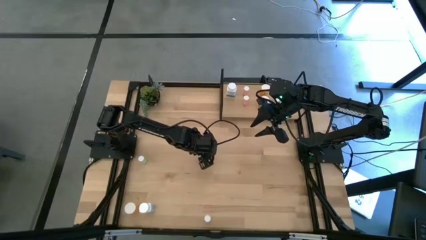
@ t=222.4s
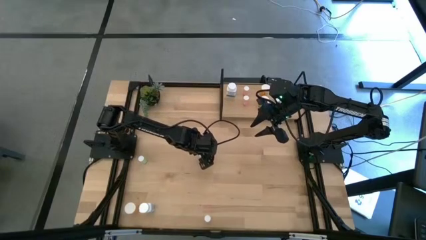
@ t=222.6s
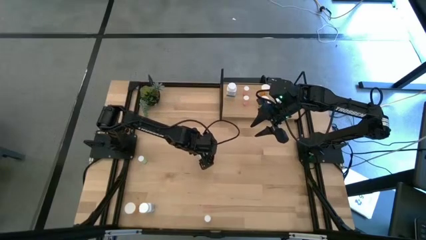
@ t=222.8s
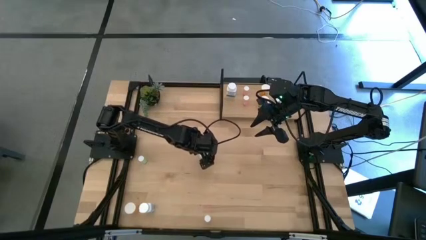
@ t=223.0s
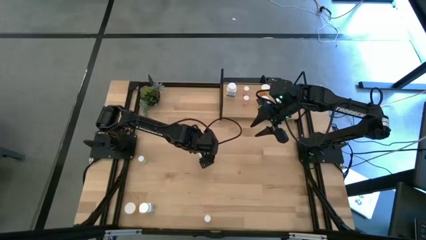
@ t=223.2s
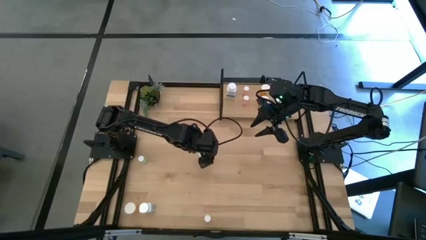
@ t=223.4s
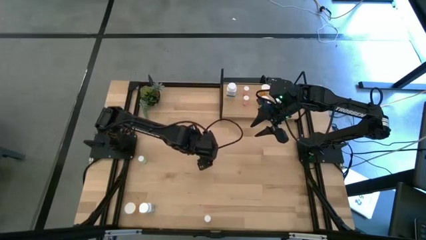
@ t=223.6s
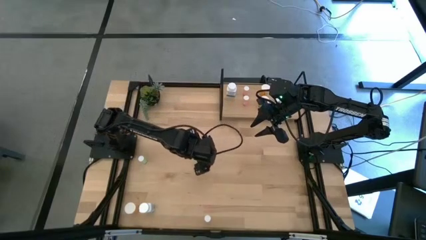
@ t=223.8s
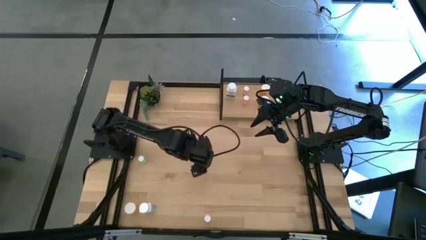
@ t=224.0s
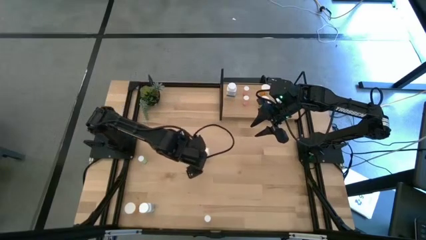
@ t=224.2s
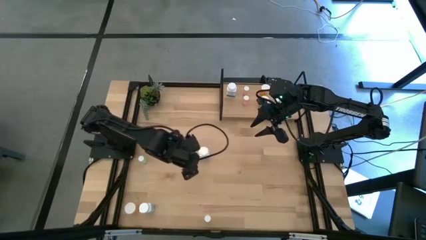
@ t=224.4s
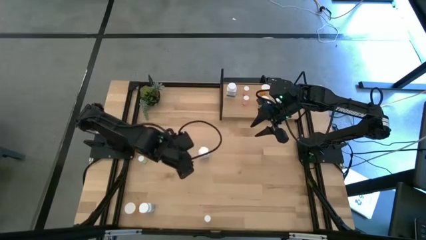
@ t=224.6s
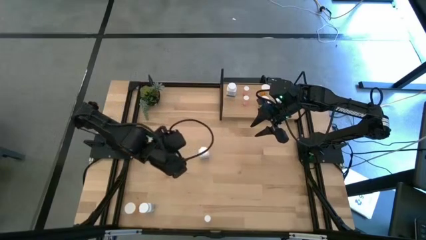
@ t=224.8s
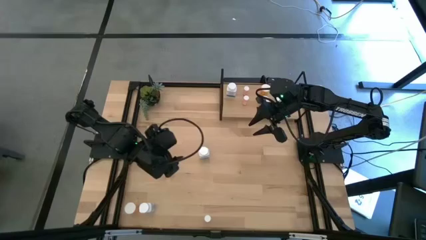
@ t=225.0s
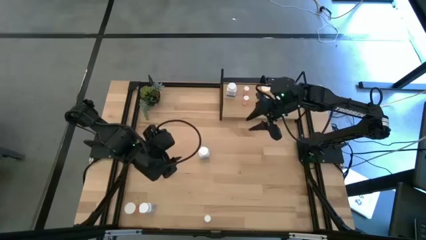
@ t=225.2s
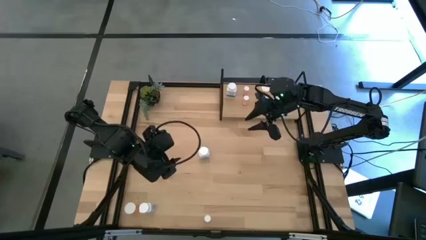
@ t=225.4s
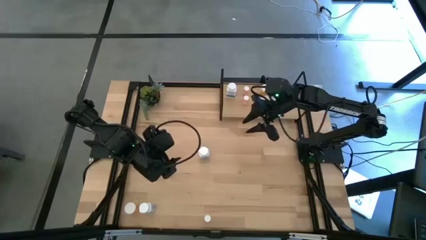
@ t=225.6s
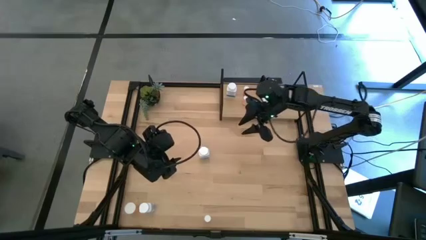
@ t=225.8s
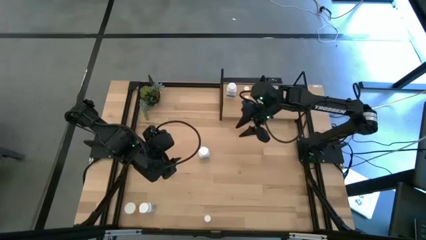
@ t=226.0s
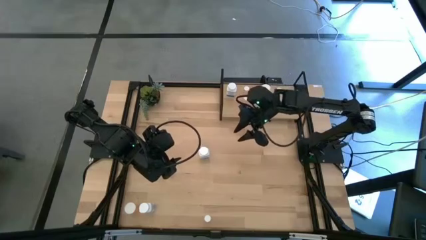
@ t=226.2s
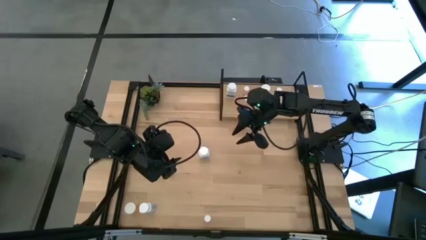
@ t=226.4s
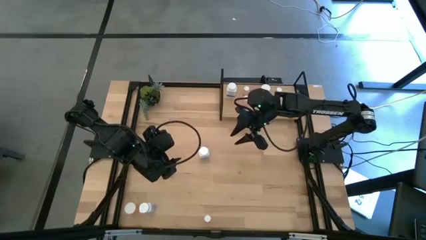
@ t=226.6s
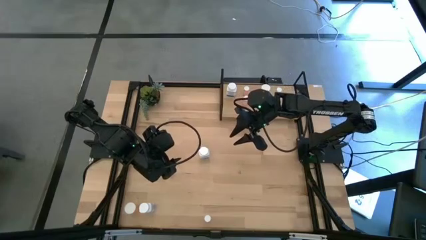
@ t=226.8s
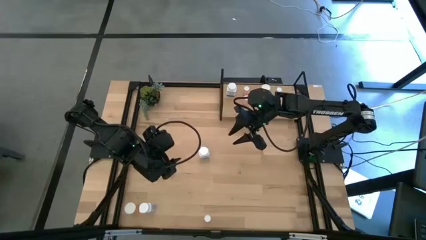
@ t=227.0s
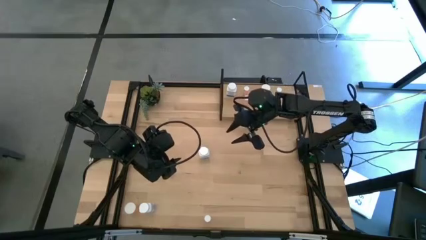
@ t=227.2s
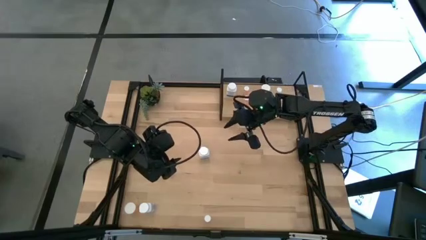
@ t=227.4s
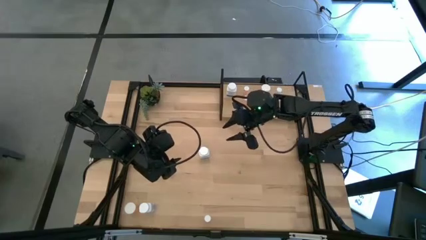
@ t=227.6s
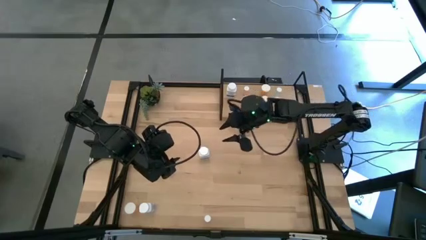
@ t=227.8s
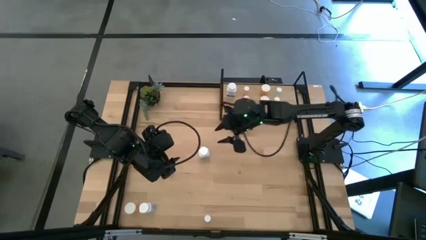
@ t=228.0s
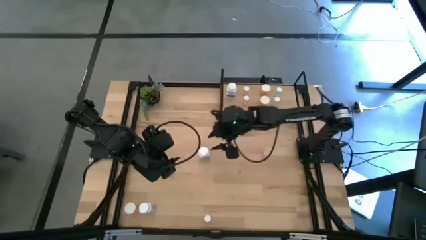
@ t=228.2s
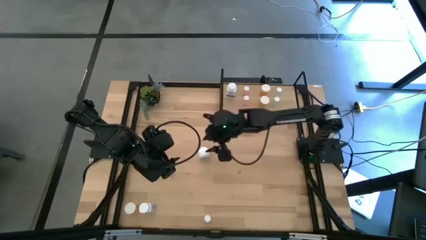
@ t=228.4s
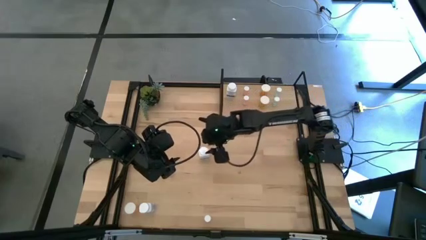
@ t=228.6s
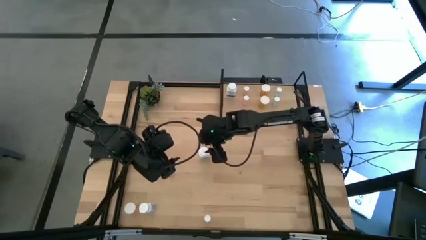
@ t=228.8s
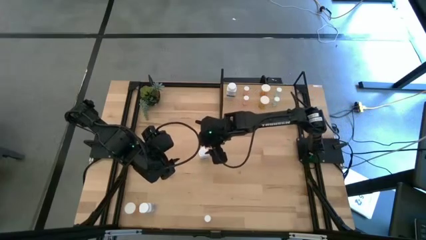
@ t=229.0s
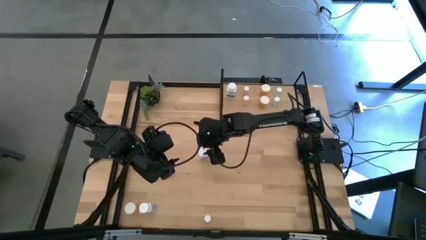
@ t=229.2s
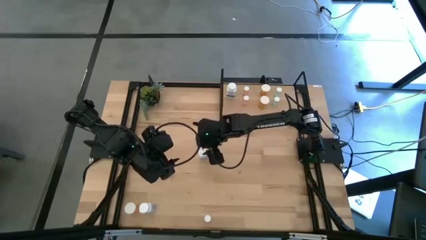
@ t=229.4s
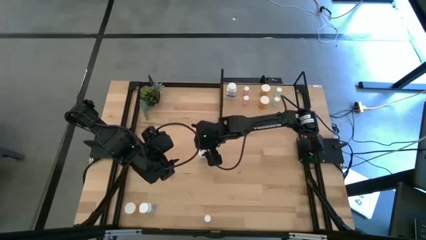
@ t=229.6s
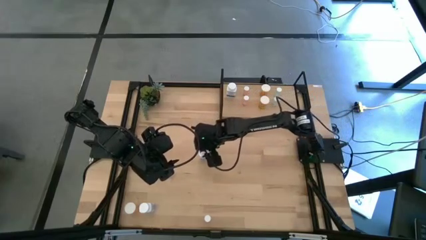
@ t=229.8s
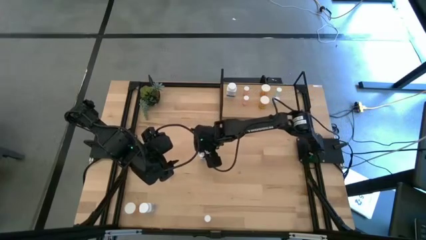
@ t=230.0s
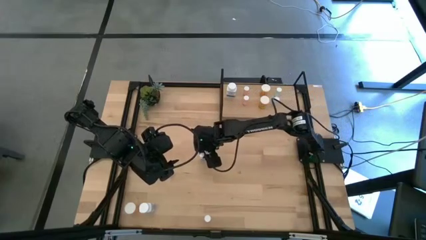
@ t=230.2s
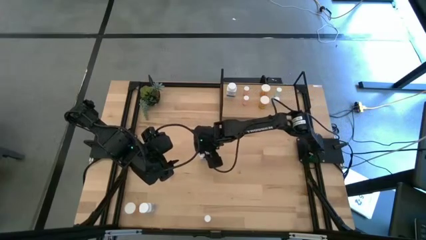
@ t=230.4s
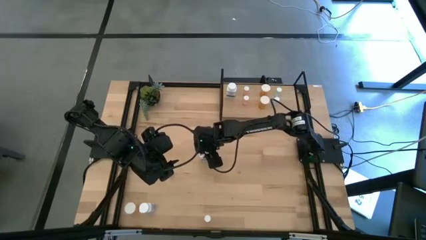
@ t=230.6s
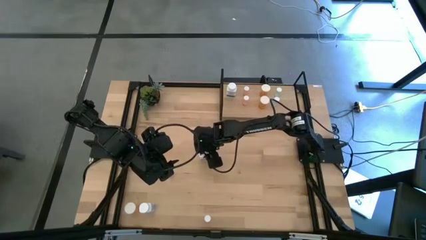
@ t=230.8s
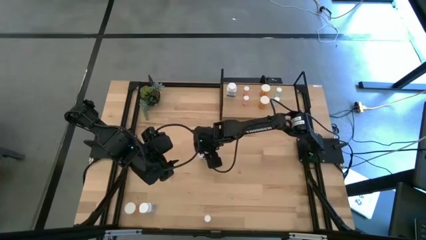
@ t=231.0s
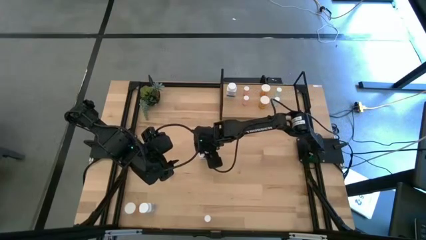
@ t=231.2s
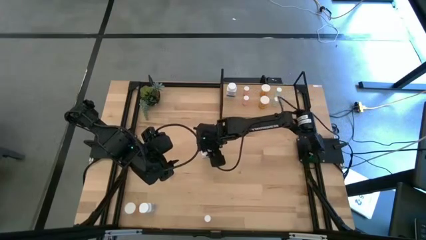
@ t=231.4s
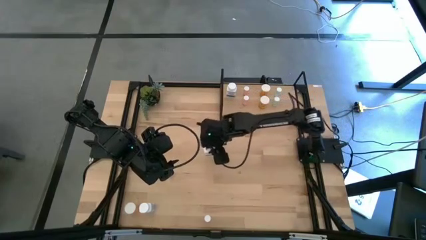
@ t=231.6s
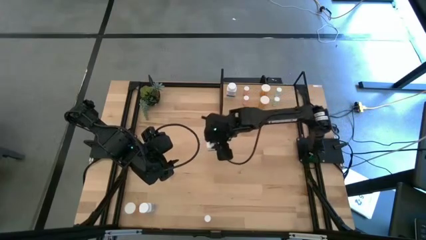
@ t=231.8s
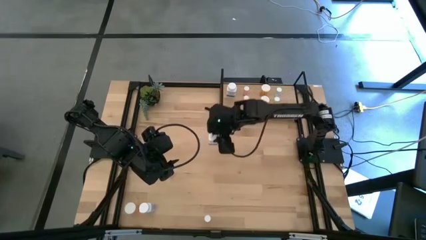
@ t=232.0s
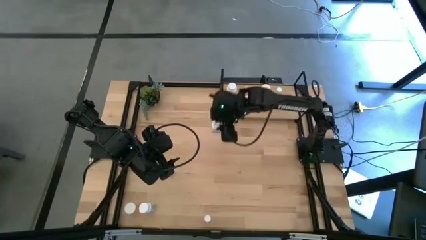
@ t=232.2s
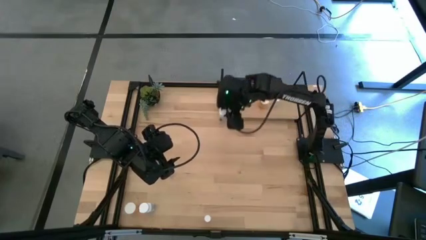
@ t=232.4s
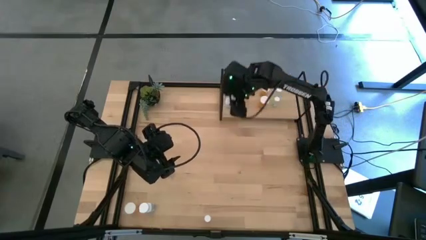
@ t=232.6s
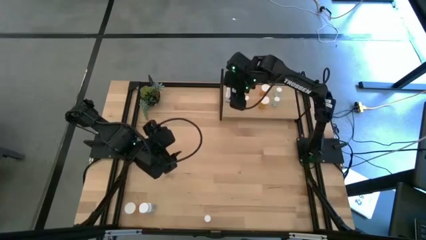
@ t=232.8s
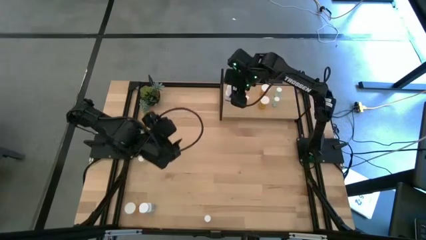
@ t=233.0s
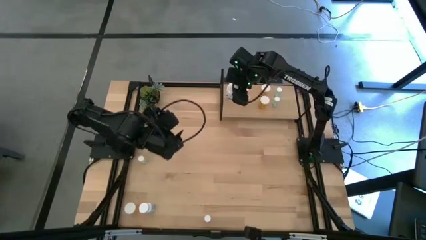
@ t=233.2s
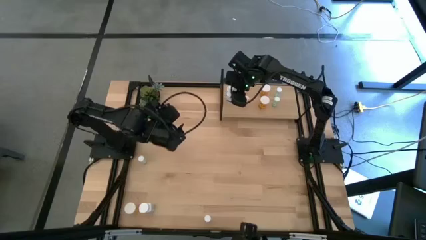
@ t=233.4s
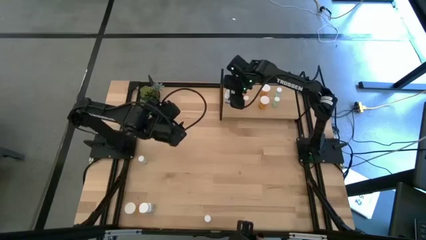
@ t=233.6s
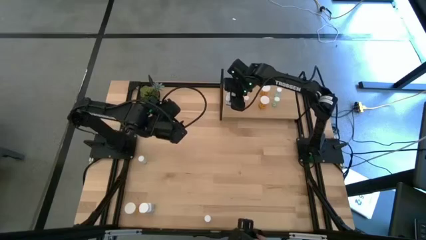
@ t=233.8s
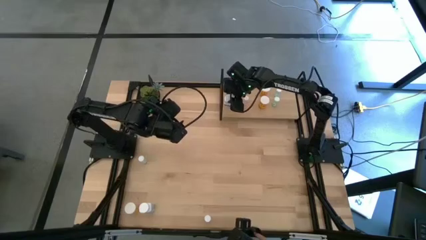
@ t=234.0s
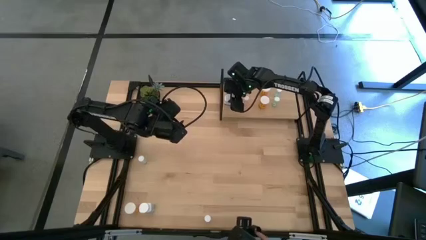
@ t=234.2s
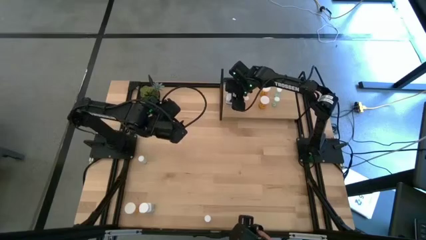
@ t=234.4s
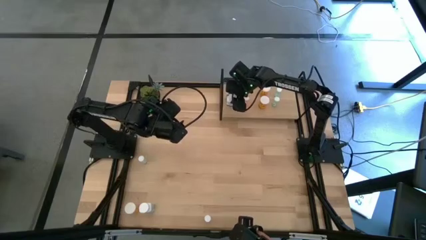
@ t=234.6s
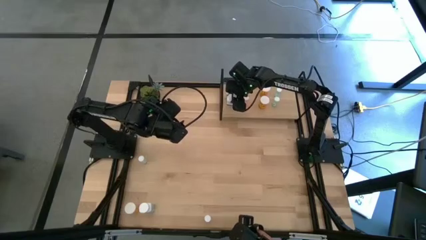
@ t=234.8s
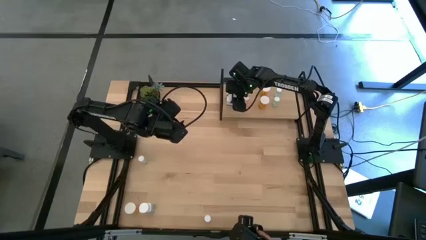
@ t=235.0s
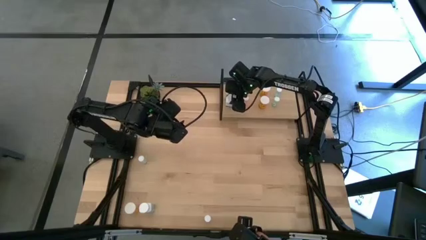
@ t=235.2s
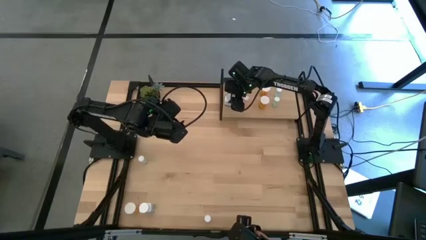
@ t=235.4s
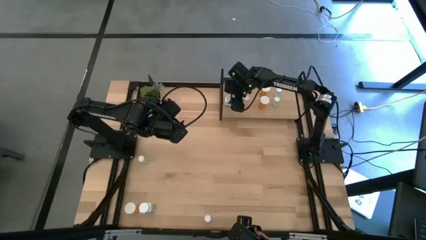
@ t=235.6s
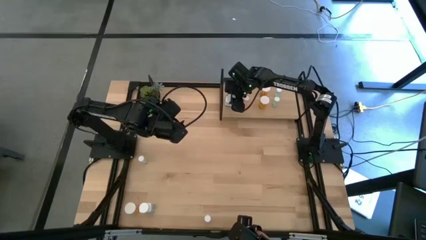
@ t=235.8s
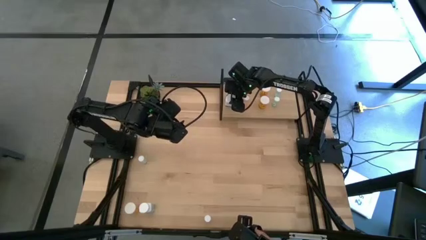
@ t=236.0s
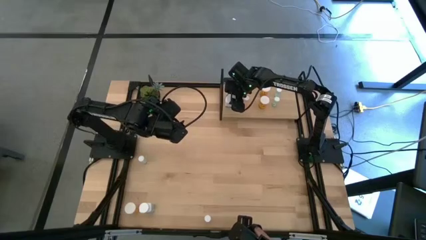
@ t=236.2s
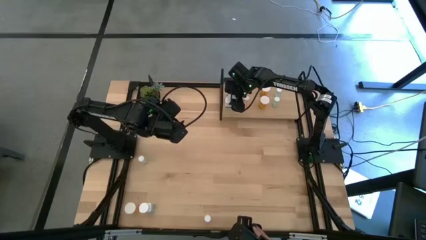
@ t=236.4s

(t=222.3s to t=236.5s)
Task: Pick and place medicine bottles onto shelf by color
Put the top white pill bottle on the shelf aligned with the other white pill bottle
